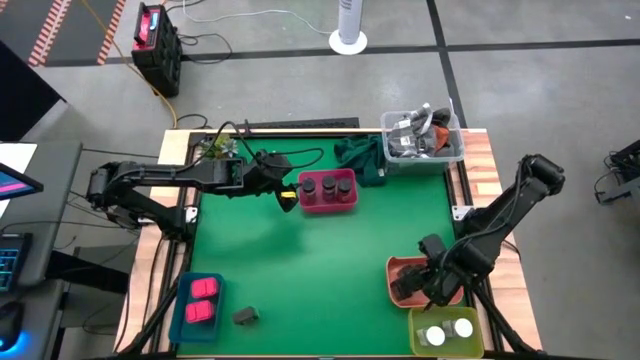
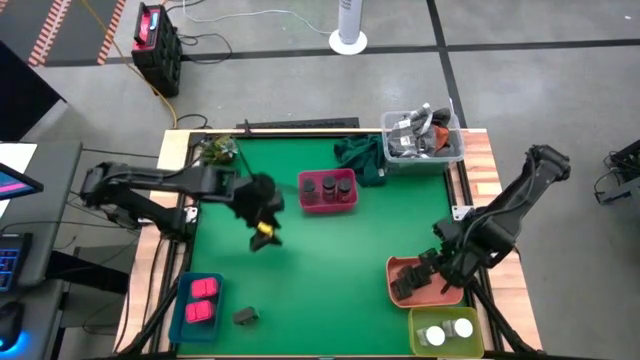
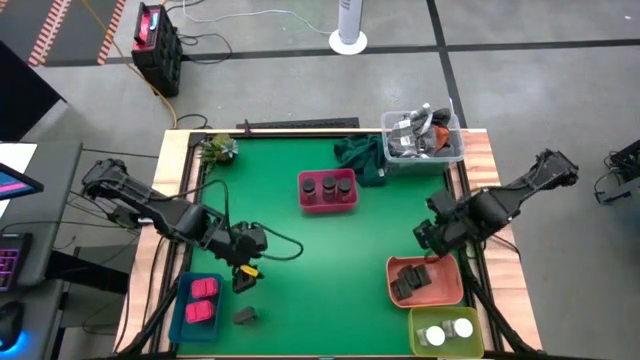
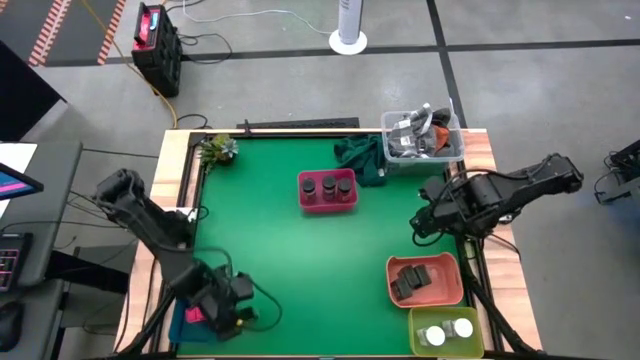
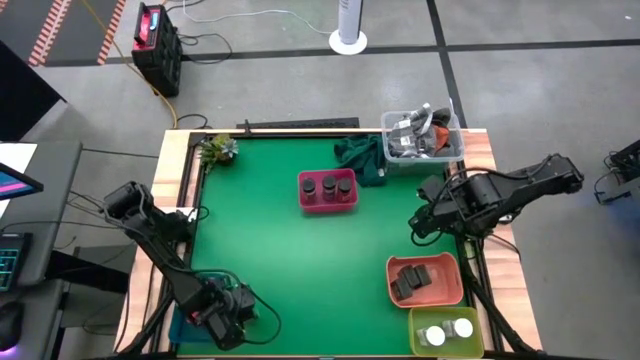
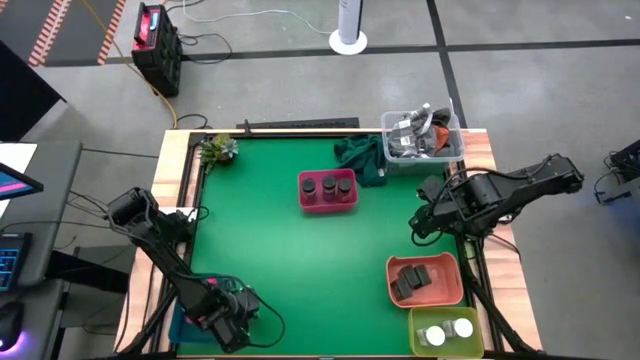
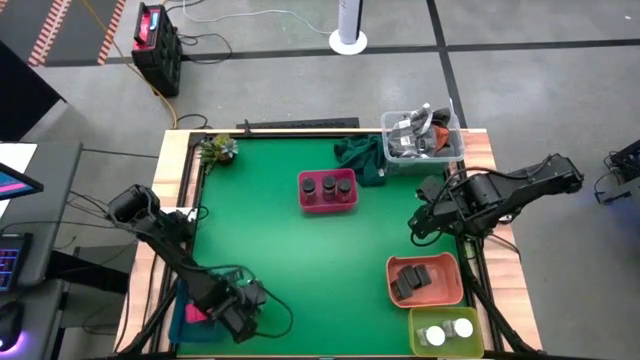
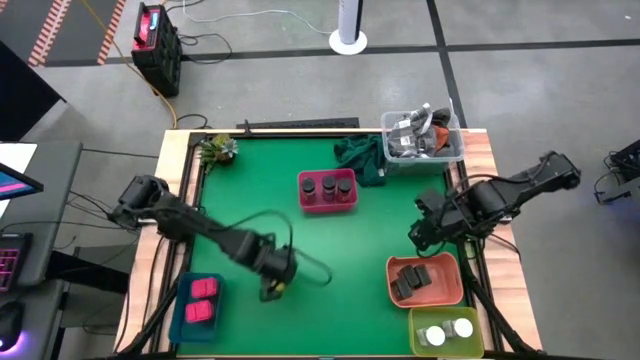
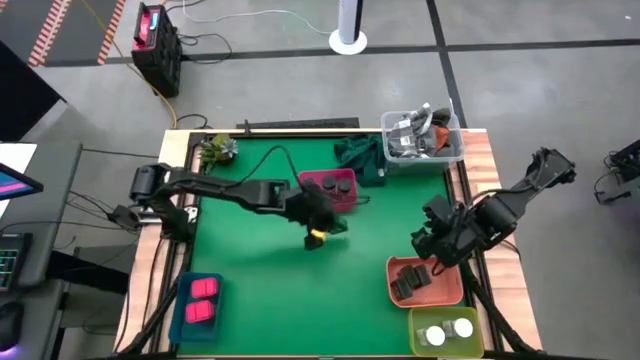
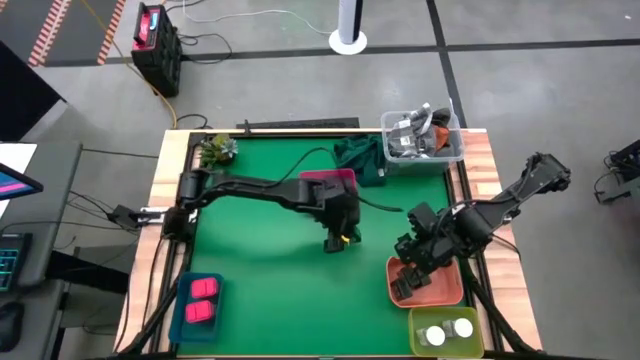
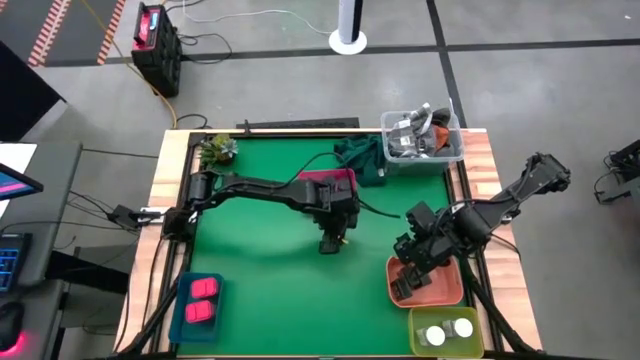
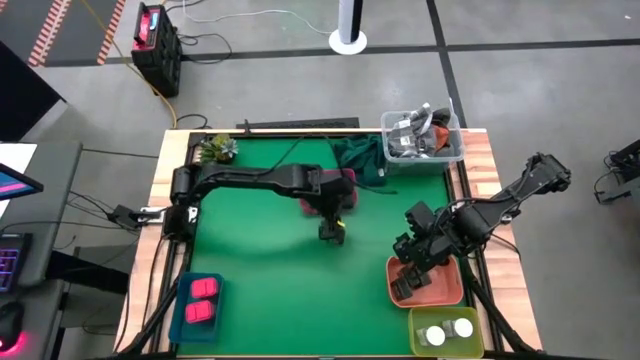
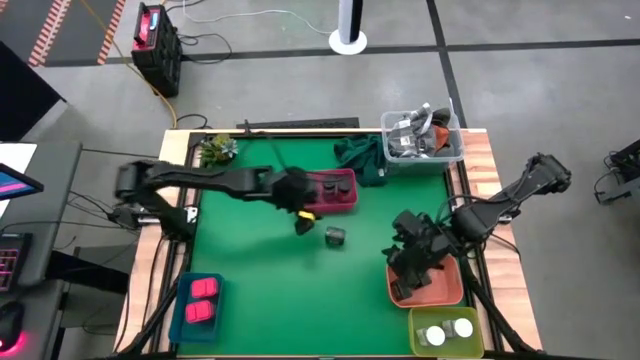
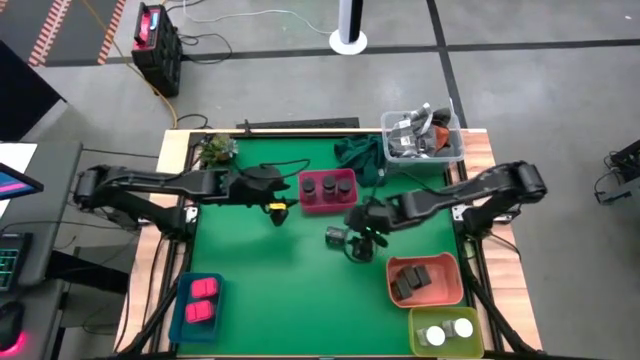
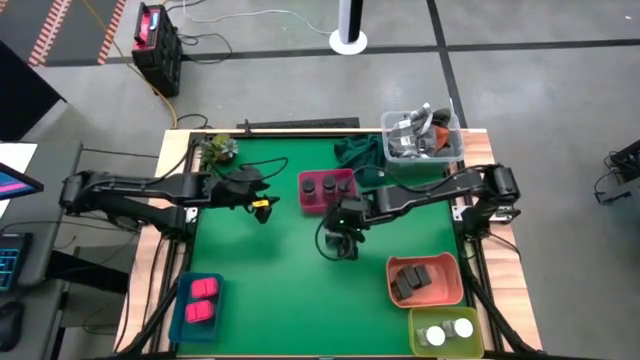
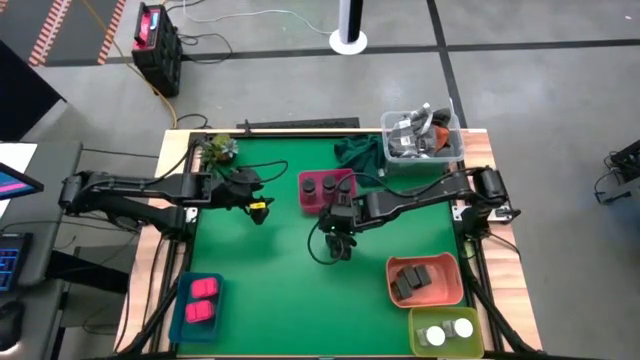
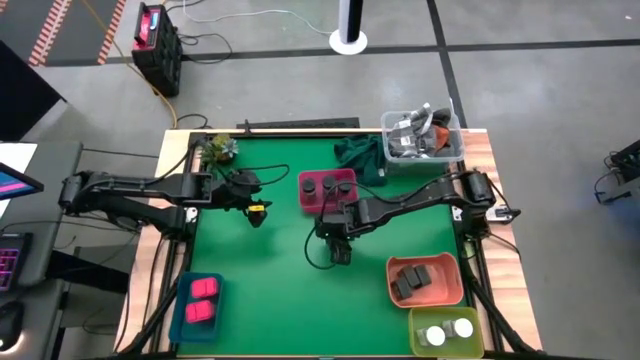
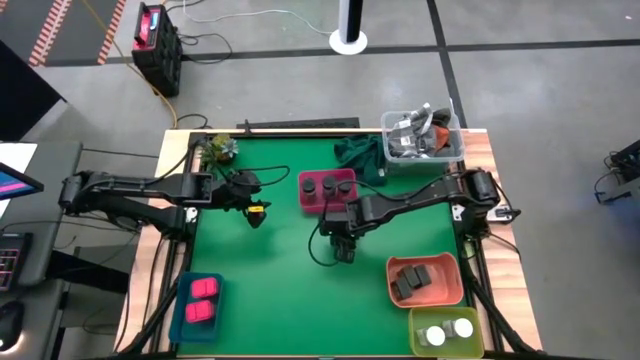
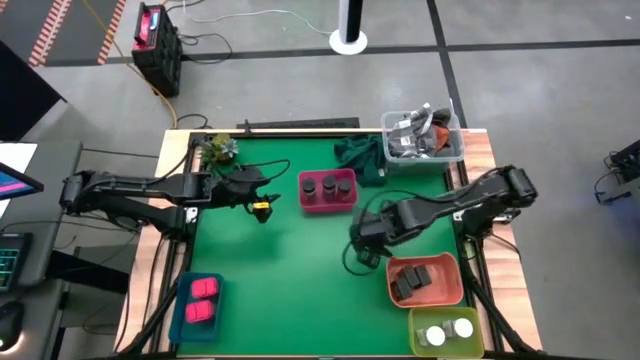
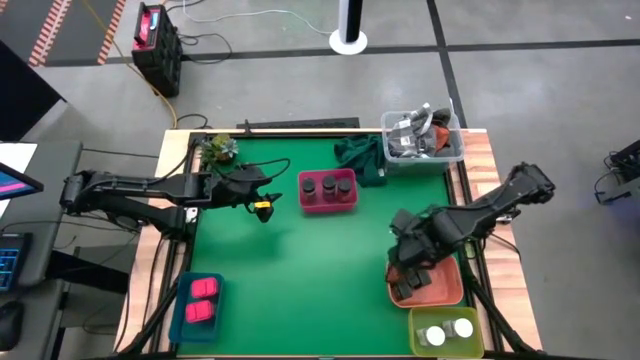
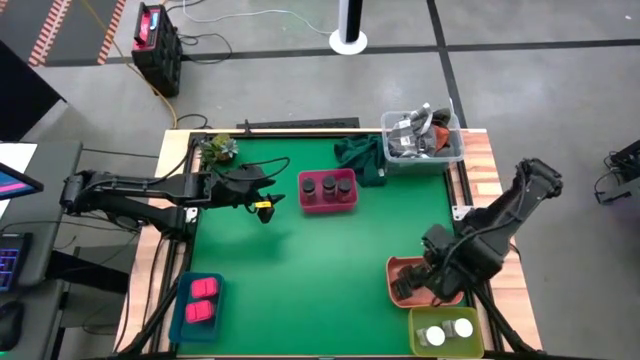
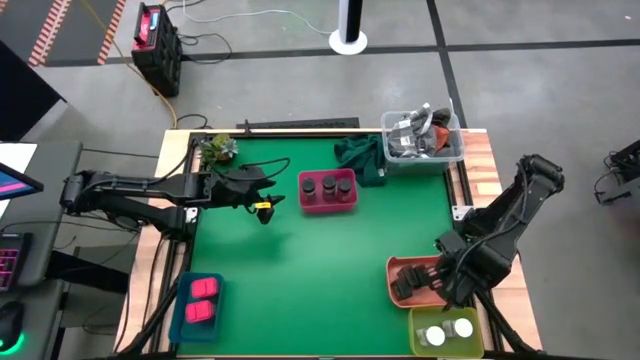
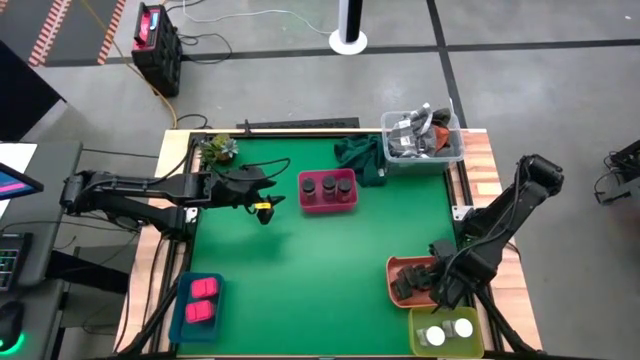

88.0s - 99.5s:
Task: Sort spices by type
Put the black seasoning can into the orange bin

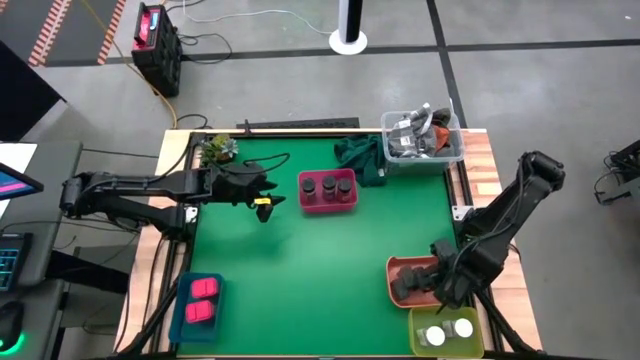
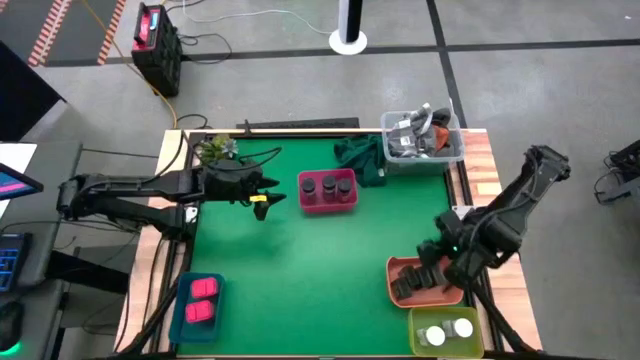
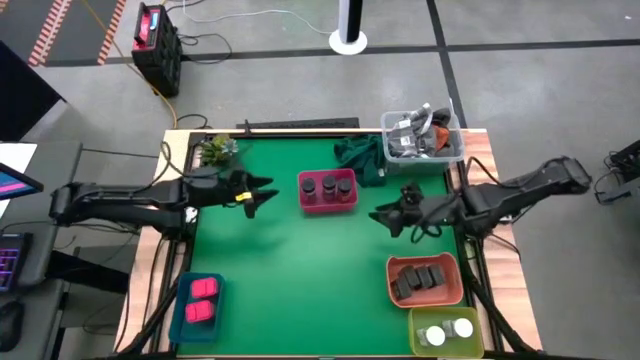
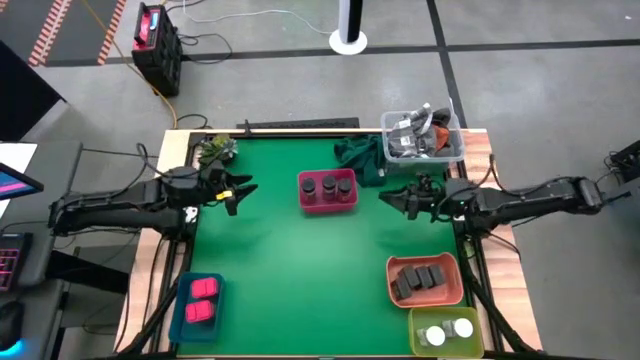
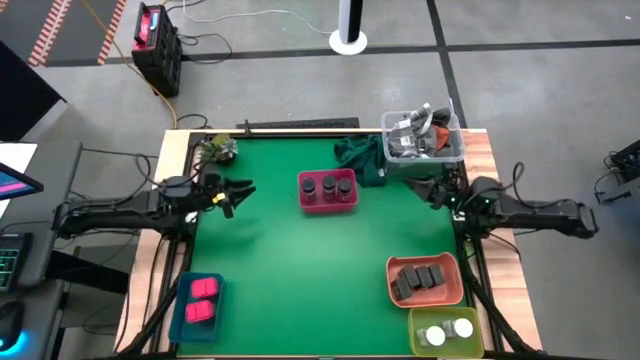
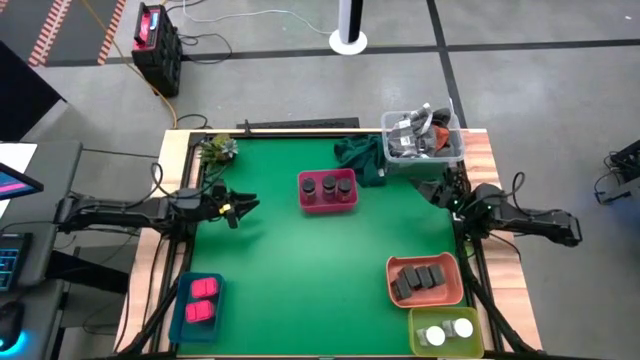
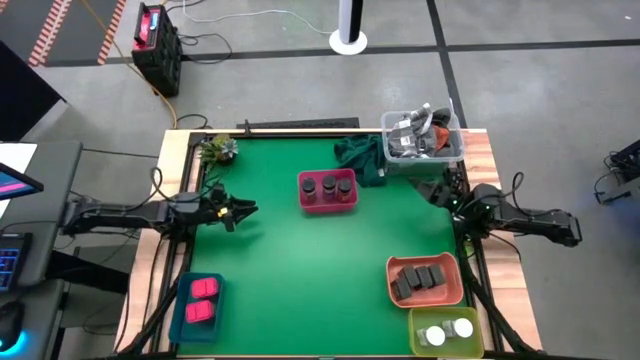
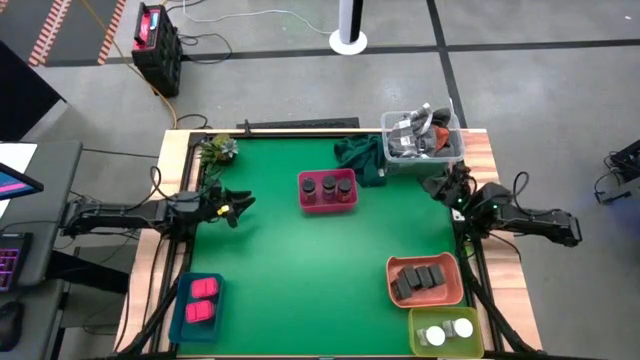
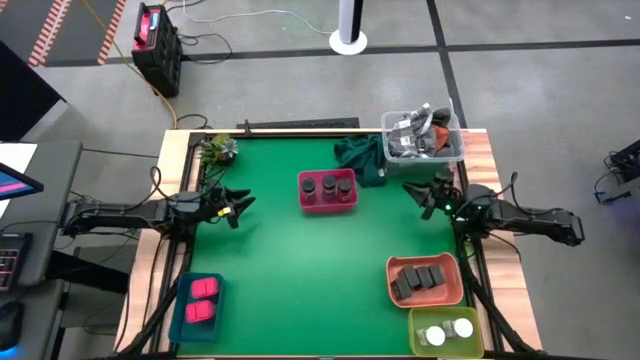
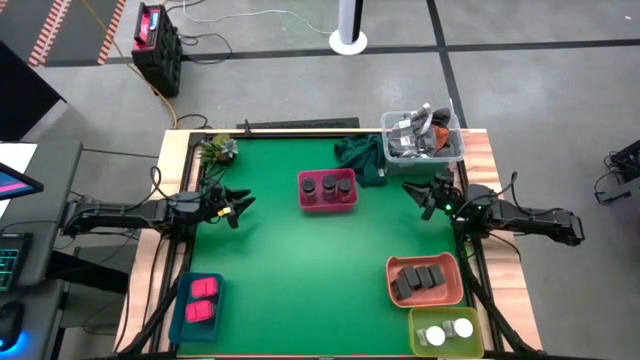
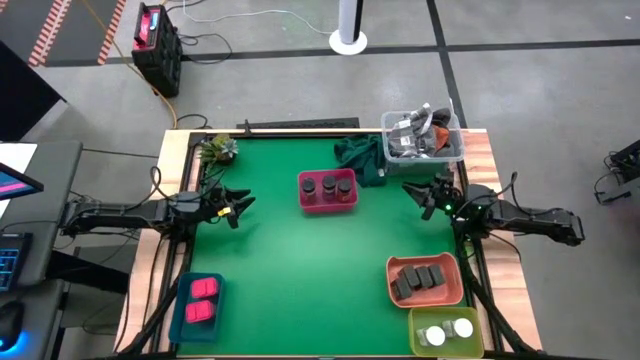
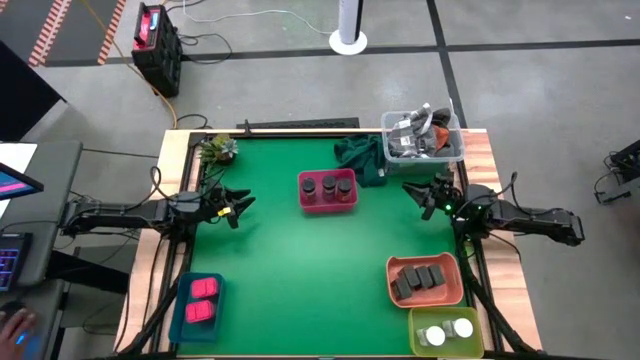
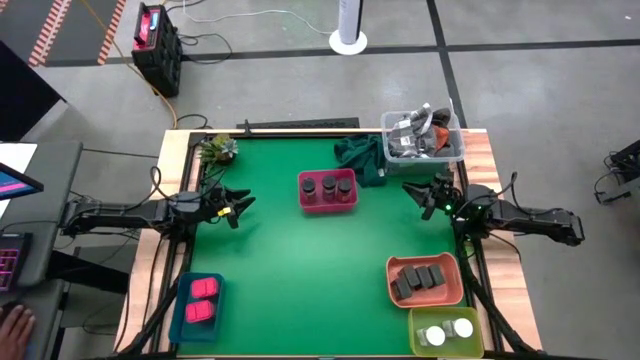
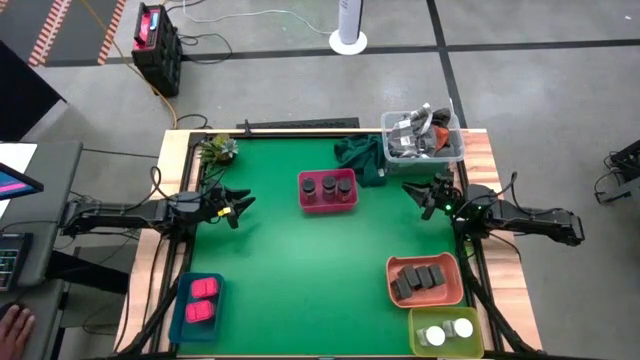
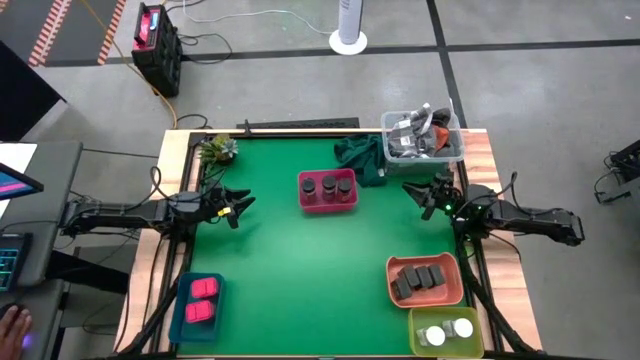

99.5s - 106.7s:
Return to Home Position
